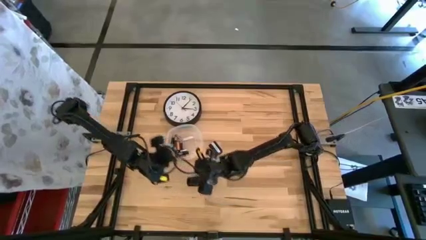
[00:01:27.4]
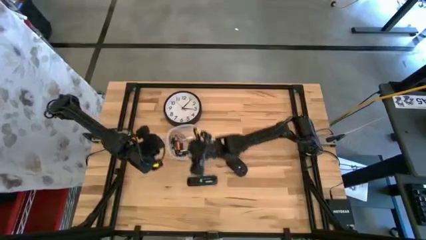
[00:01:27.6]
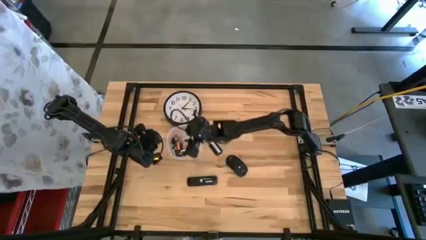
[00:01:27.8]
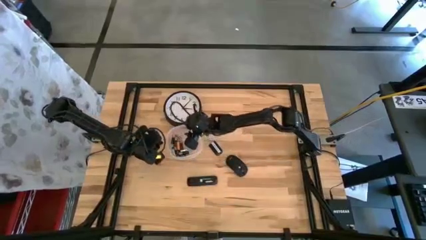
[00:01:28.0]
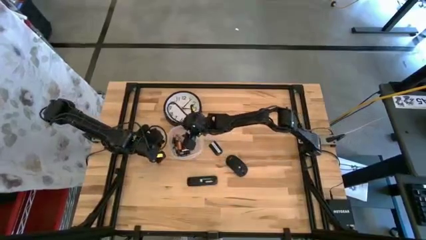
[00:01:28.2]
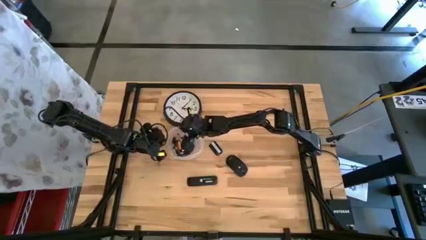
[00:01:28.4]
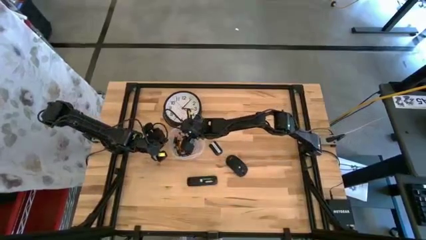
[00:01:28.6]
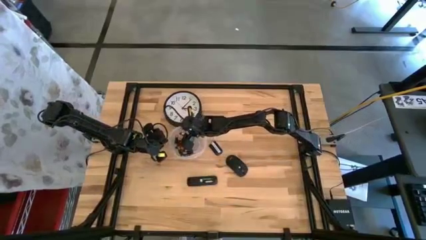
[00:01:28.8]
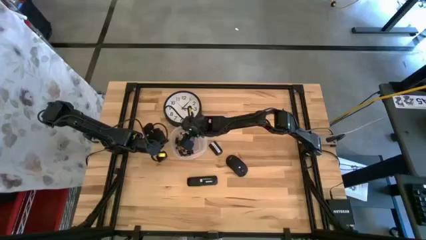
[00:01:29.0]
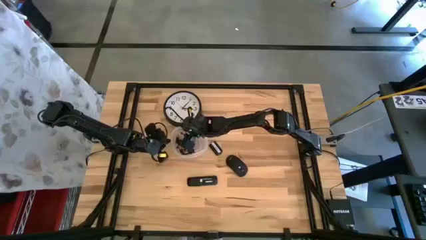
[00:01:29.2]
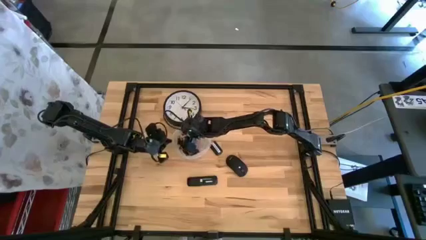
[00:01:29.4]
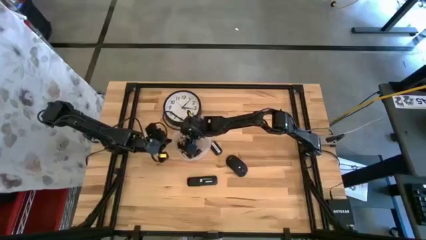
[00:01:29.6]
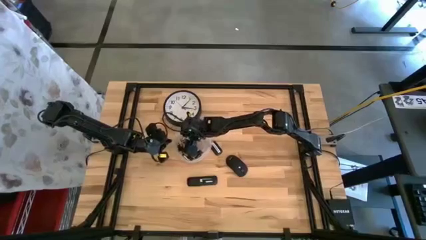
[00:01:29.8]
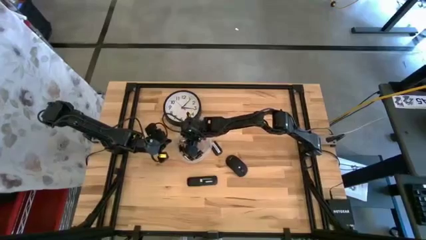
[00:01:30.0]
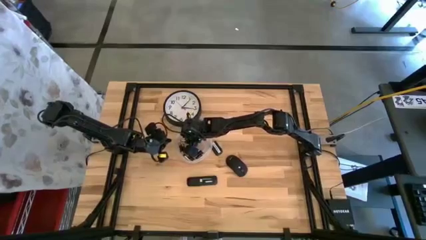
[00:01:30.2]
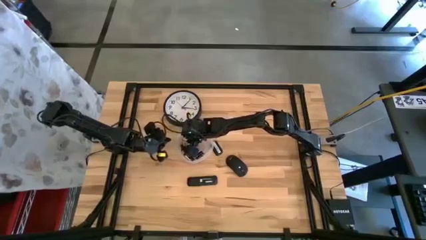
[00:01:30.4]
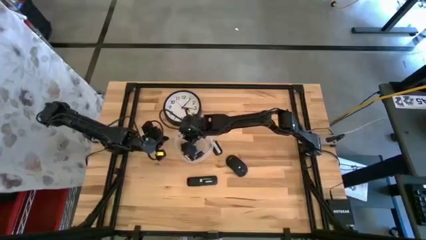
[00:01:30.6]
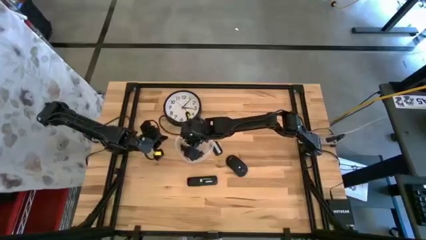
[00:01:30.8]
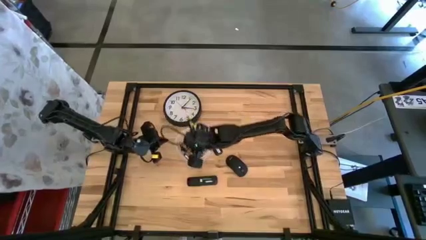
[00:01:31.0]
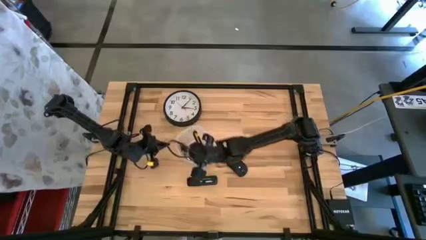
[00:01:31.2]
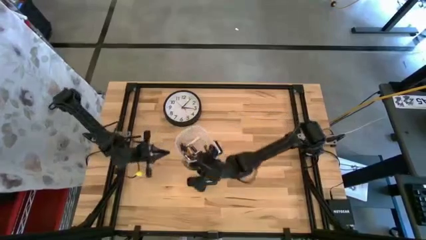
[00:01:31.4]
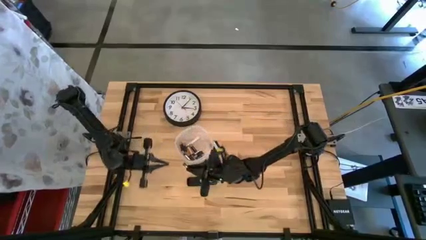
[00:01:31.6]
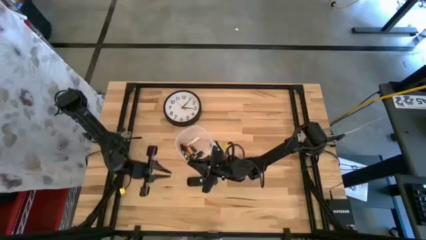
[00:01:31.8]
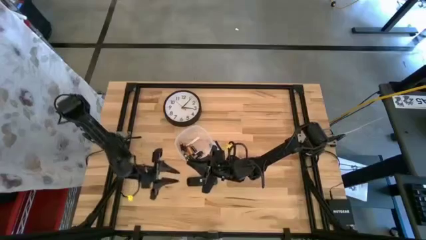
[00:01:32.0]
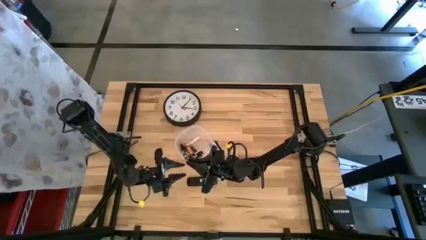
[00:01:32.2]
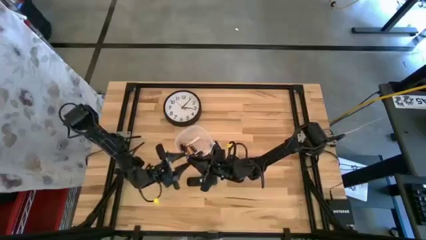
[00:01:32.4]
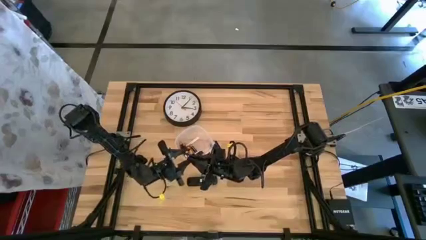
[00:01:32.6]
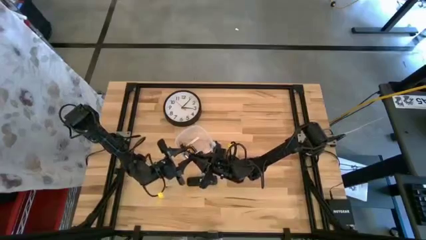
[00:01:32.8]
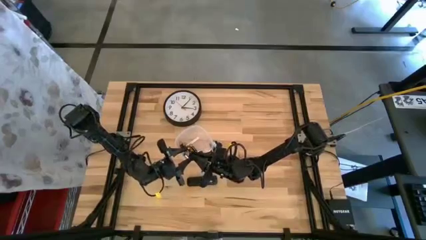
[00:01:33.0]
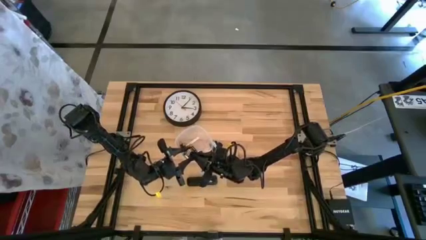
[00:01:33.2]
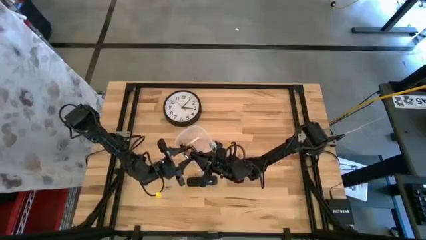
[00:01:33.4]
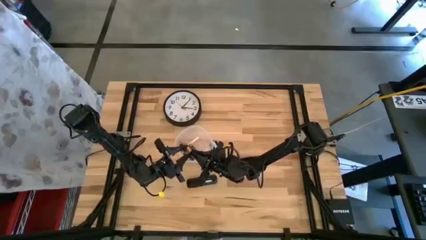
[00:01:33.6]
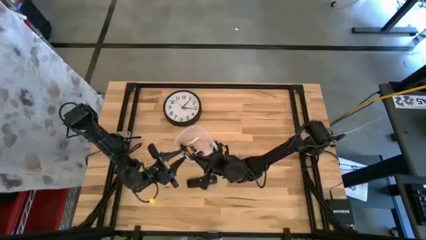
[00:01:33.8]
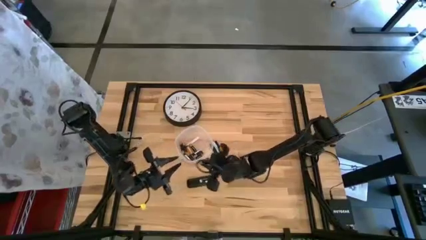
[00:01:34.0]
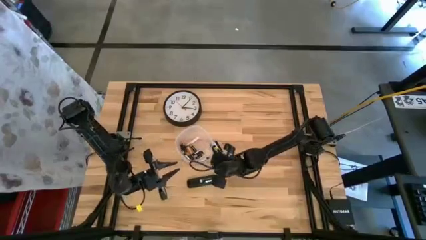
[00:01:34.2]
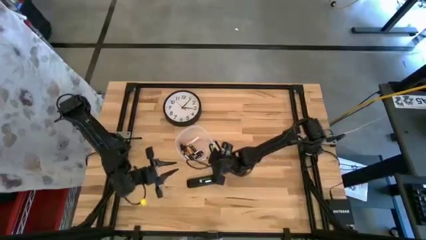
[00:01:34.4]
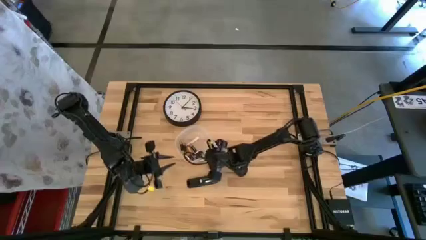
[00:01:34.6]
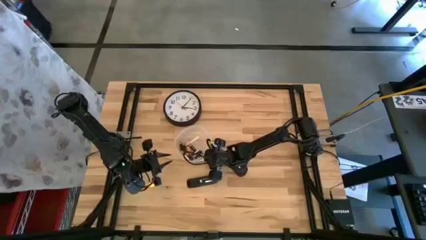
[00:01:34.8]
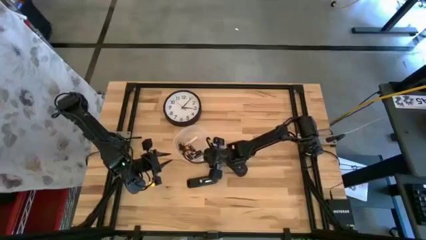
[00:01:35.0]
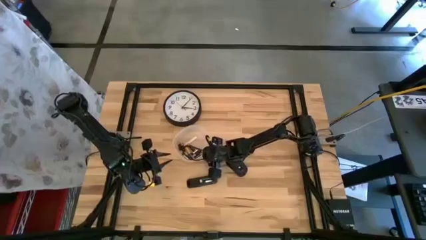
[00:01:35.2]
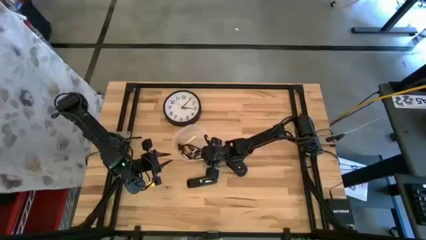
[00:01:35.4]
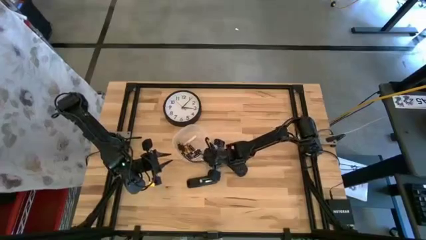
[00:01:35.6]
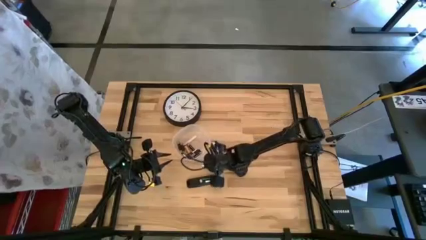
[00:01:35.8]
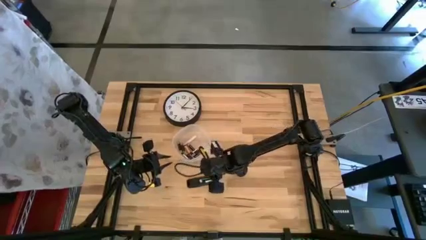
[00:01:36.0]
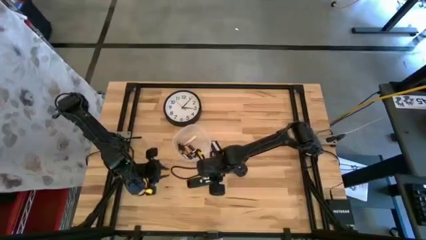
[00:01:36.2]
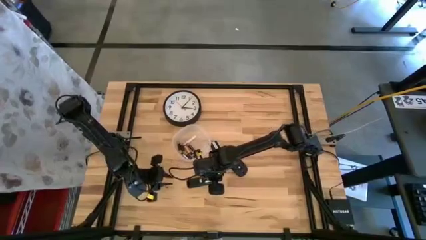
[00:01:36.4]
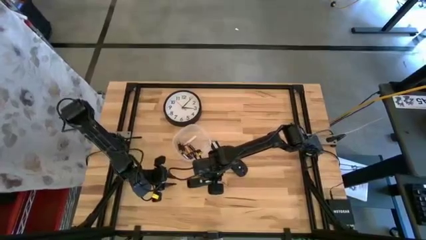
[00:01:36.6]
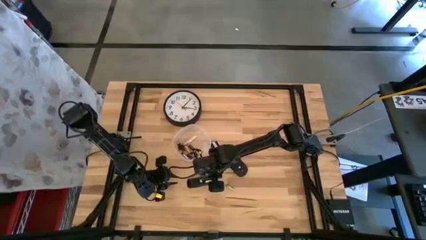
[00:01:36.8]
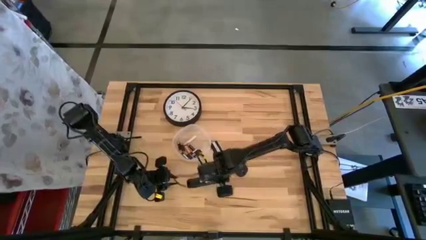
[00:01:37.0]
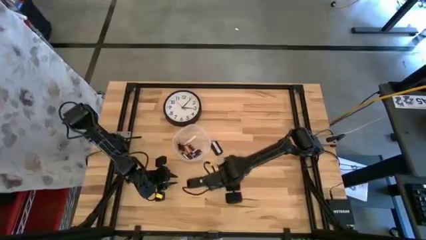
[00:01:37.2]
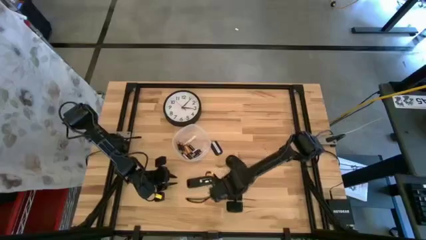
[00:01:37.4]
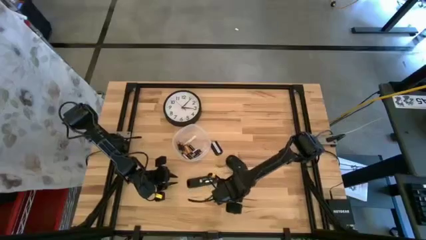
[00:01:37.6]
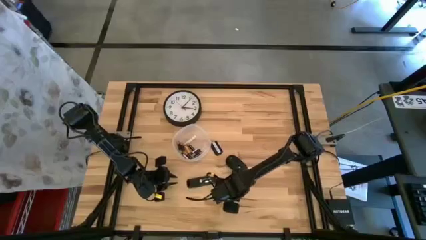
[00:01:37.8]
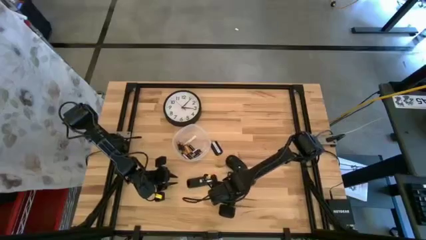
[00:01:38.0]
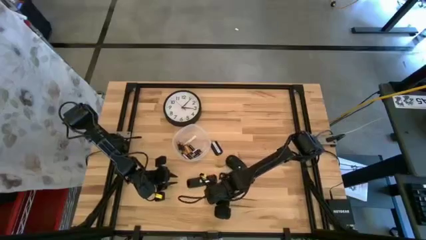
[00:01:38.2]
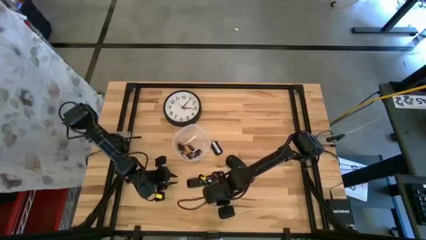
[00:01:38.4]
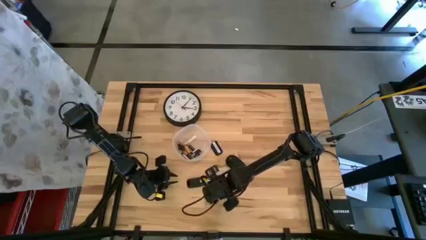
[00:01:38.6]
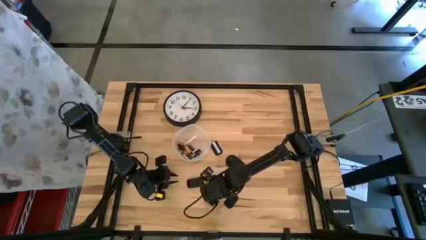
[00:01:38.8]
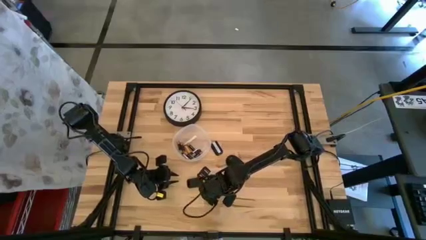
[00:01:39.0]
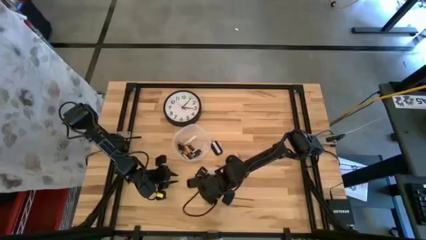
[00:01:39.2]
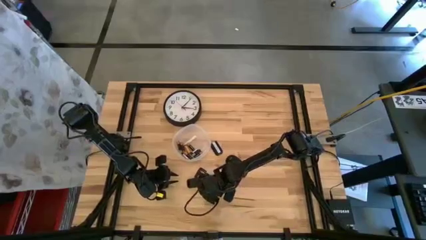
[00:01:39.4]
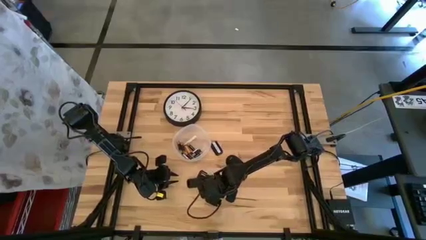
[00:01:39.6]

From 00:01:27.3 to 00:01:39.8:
Task: Insert battery
Insert the silver battery into the remote control
